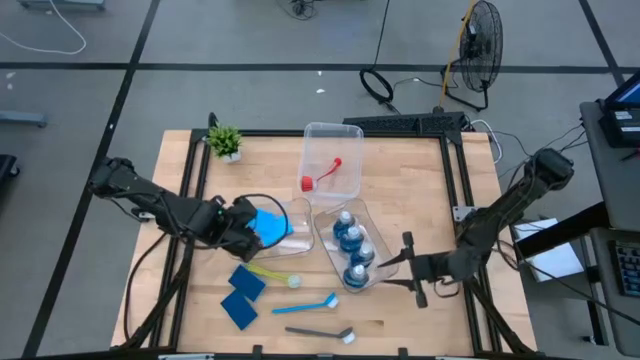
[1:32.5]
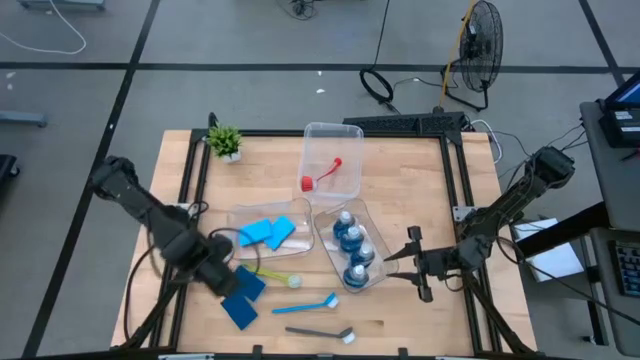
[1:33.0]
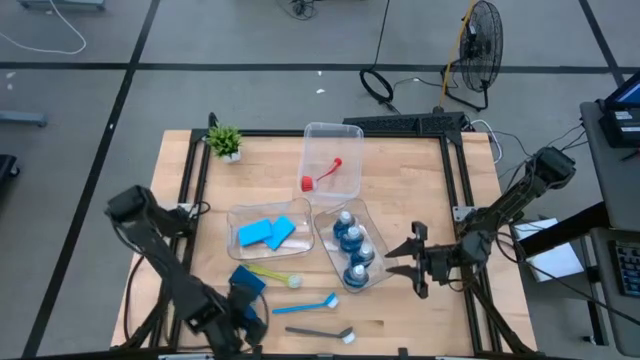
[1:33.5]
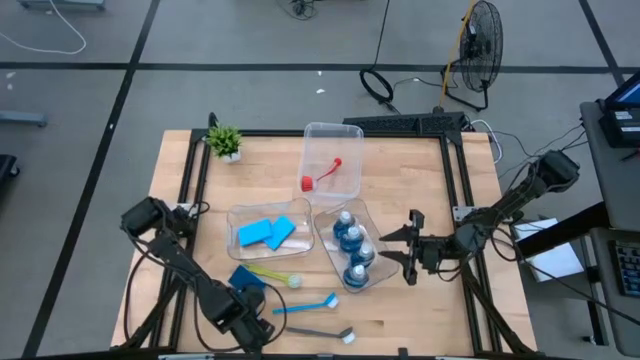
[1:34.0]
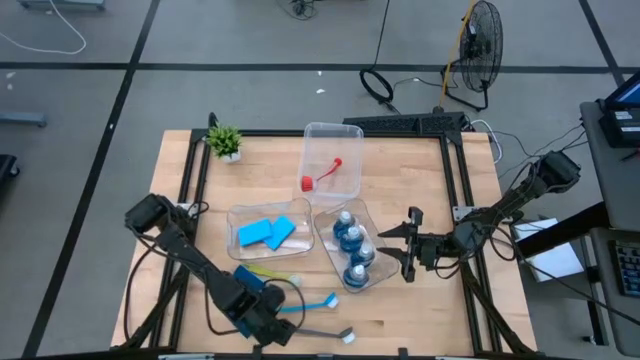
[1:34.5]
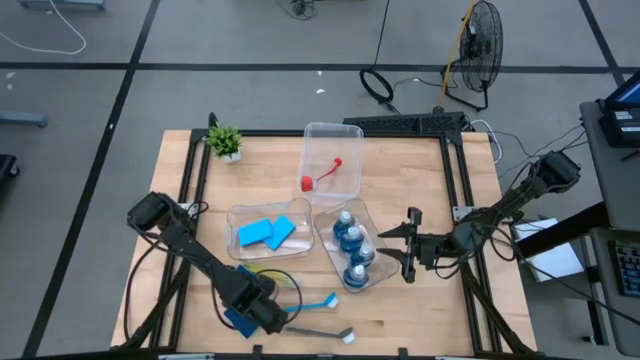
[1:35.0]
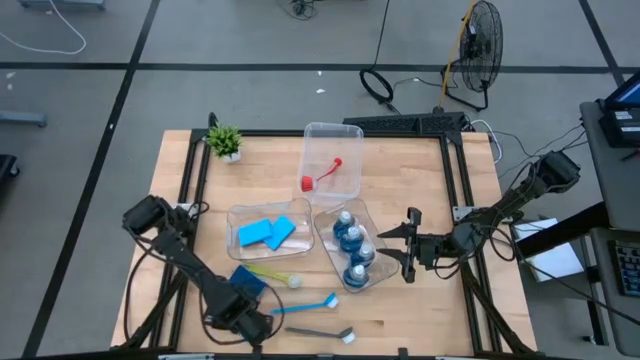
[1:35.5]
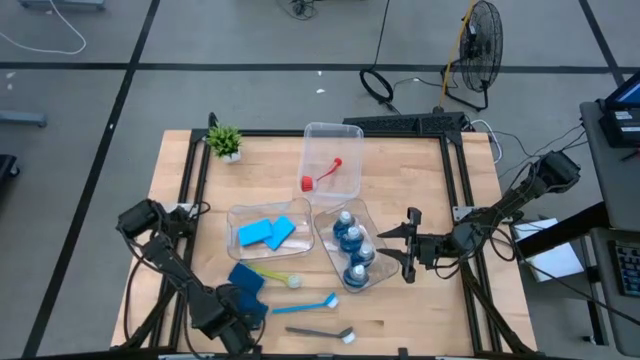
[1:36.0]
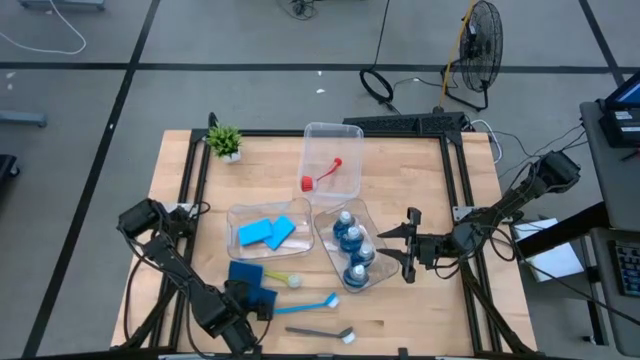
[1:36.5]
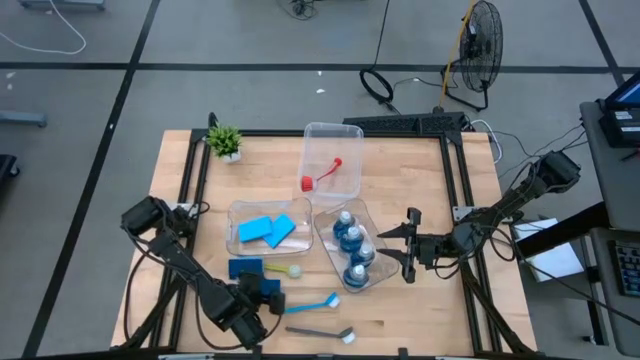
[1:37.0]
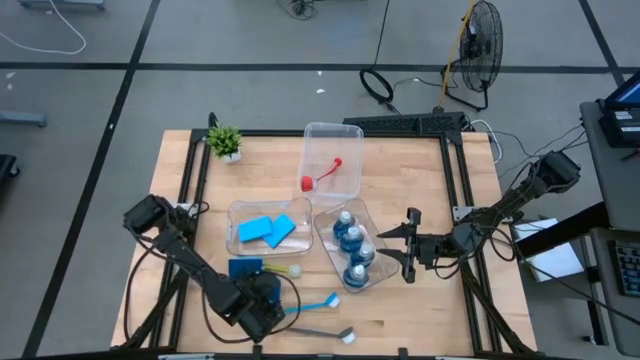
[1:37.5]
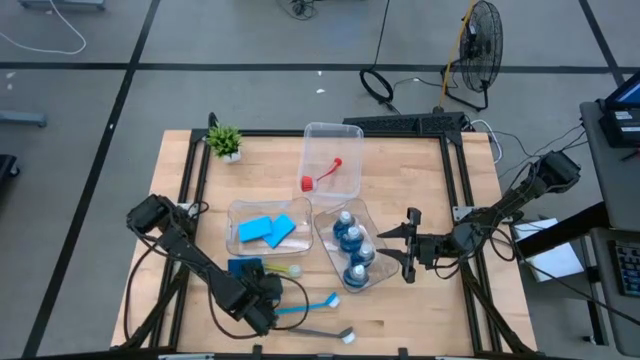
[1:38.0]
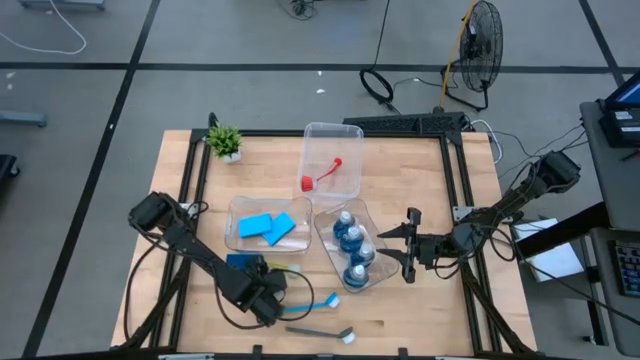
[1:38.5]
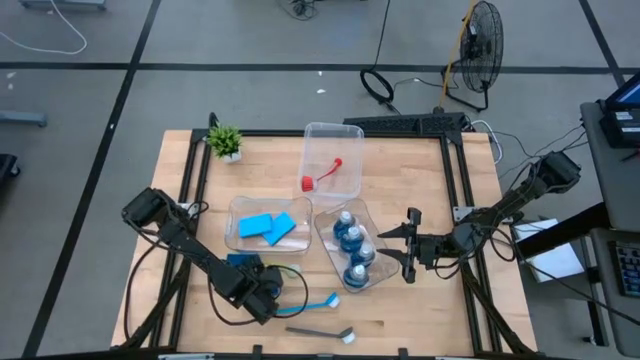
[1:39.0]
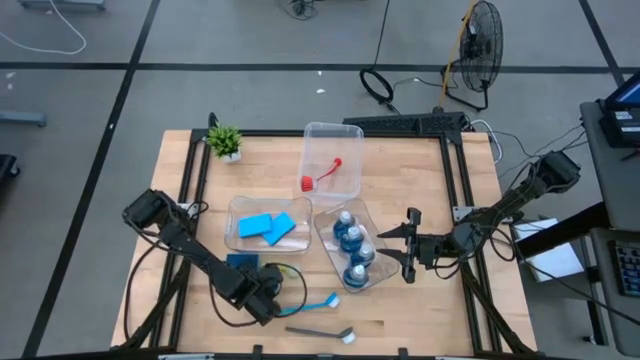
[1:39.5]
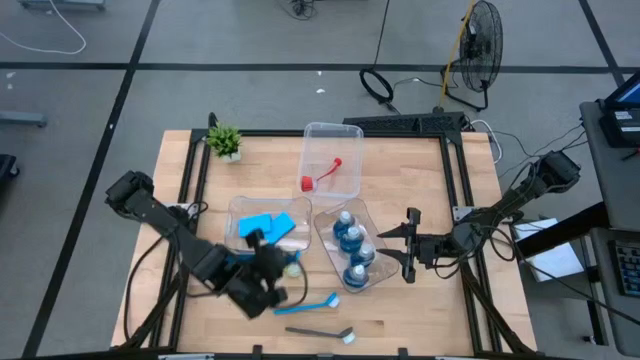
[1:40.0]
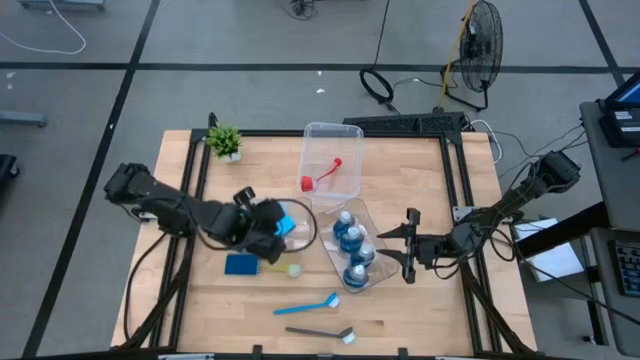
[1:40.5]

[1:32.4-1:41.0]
Task: Pick & Place Kitchen Sink Supplies
Put the blue sponge into the left transparent bin

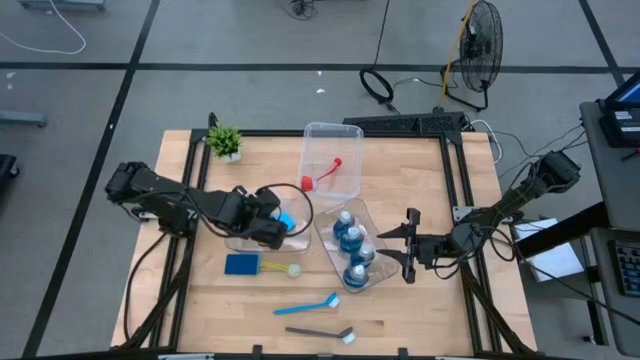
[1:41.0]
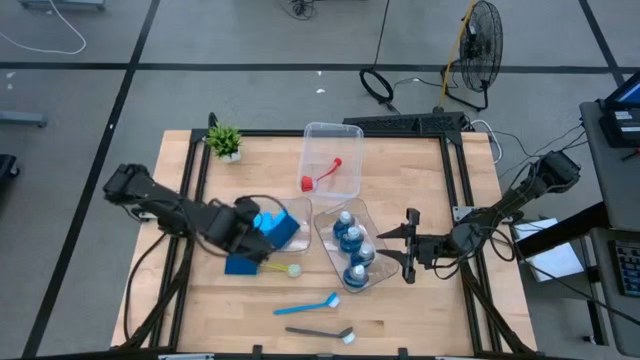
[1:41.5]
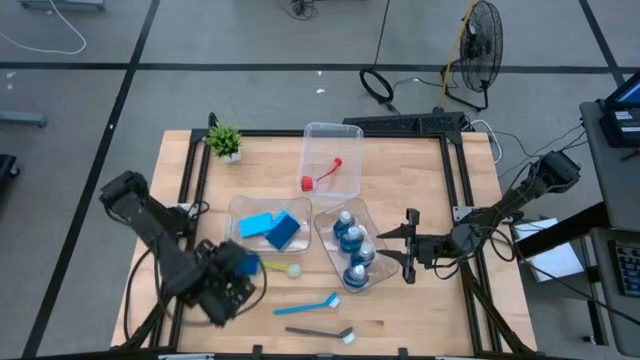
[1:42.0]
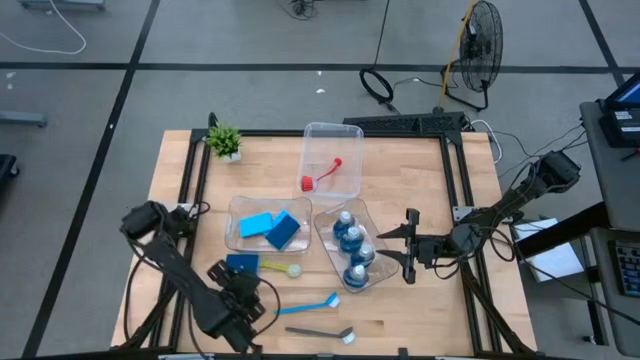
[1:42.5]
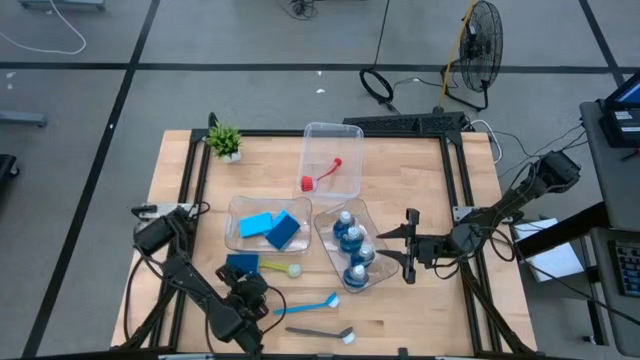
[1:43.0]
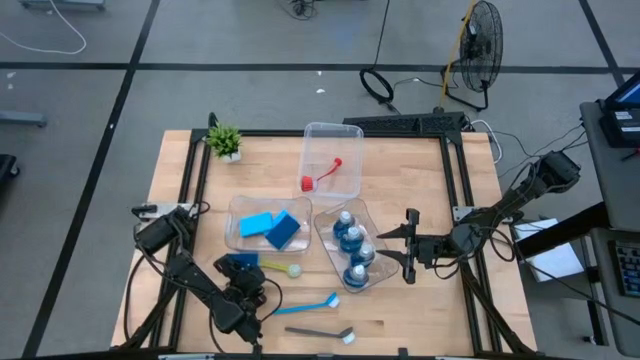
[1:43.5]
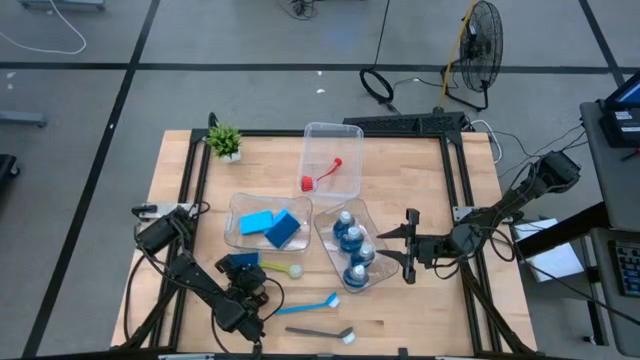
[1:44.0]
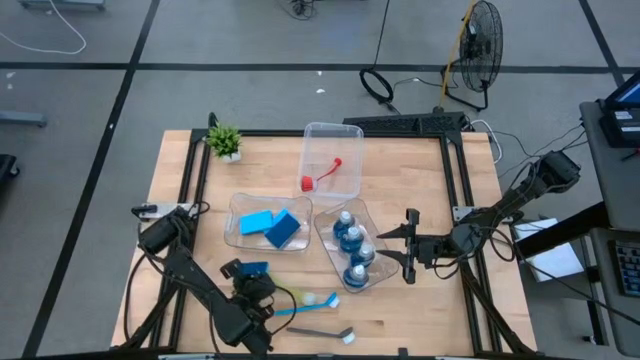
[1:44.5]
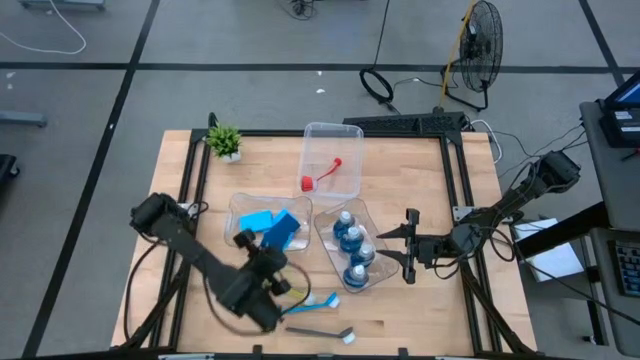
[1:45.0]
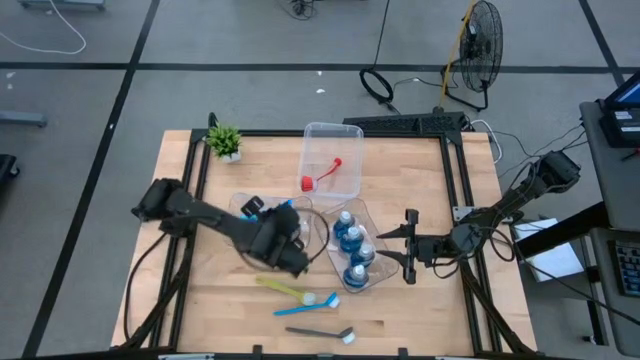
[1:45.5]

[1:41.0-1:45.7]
Put the blue sponge into the left transparent bin

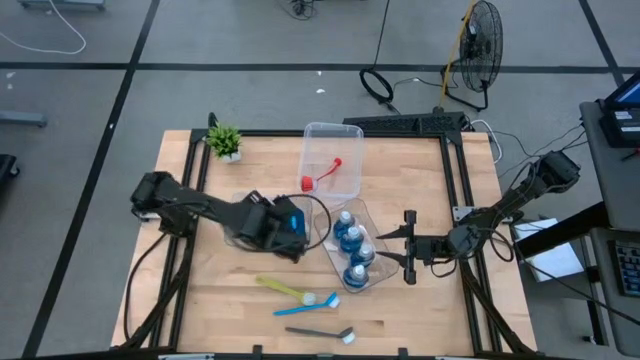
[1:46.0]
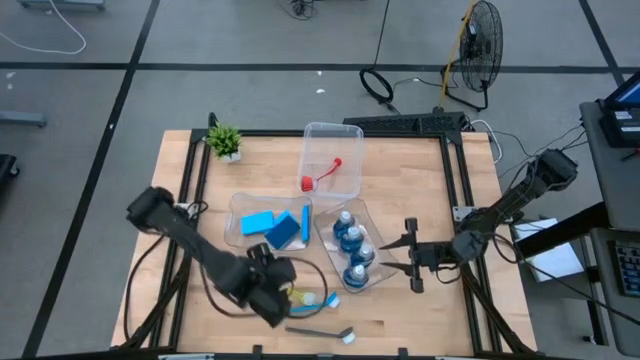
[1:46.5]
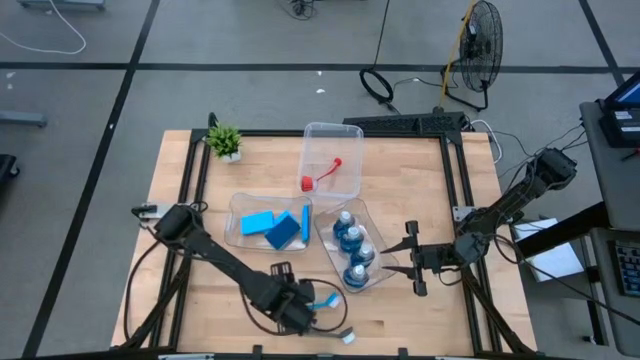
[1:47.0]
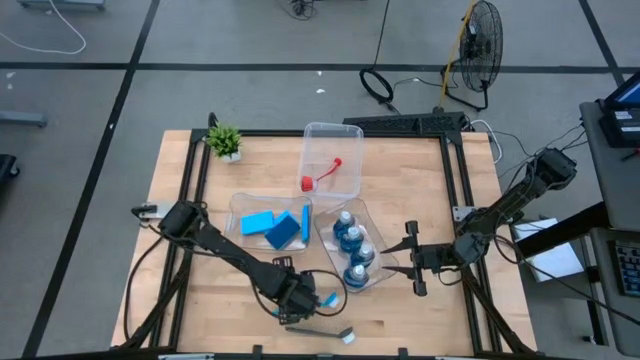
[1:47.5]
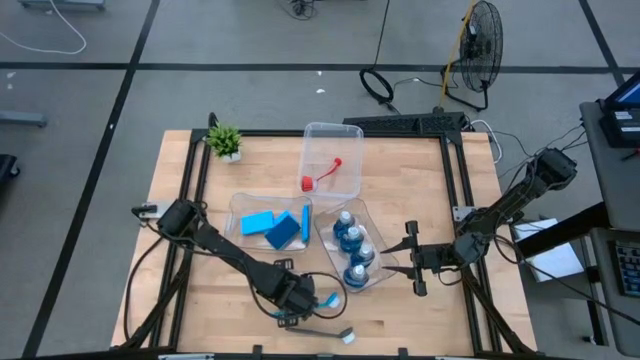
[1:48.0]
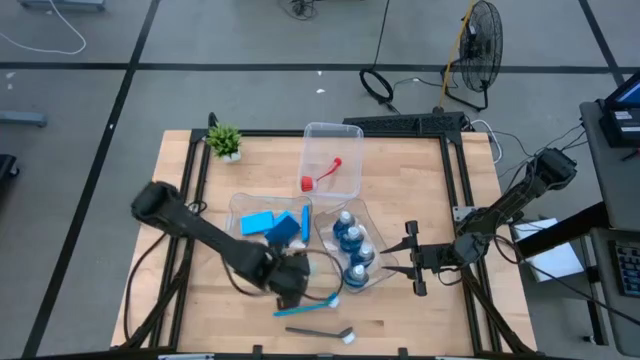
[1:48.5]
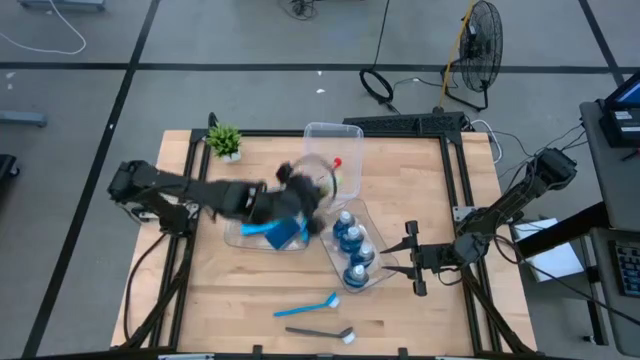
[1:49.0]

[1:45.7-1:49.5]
Put the green dish brush into the transparent container

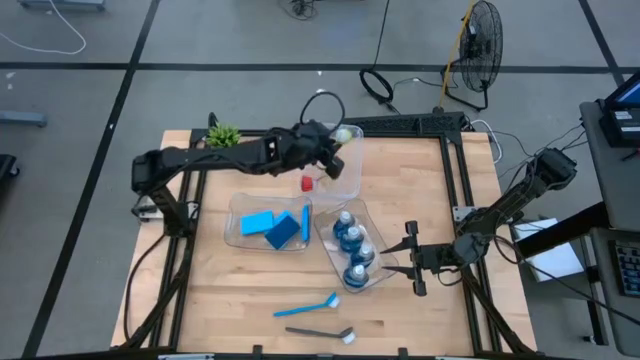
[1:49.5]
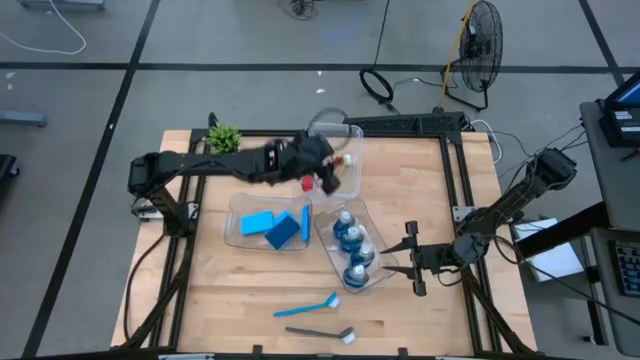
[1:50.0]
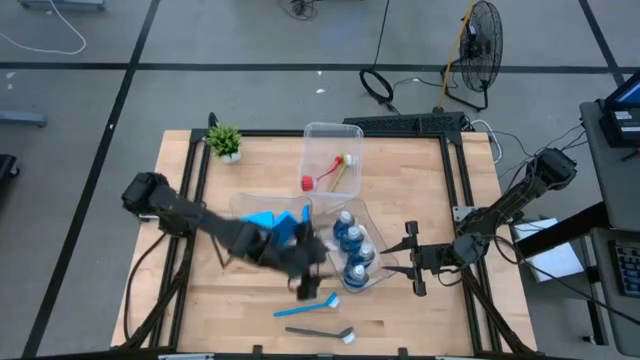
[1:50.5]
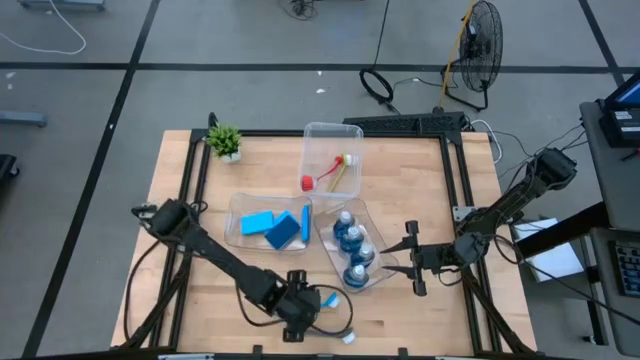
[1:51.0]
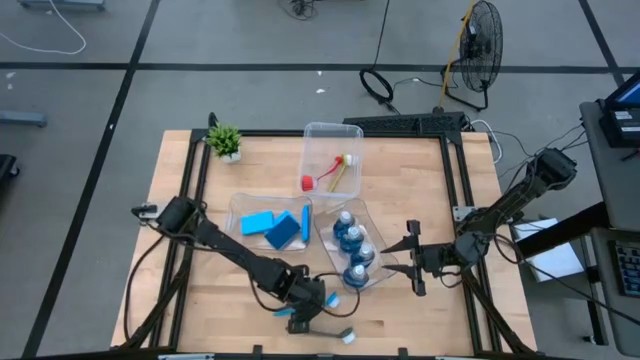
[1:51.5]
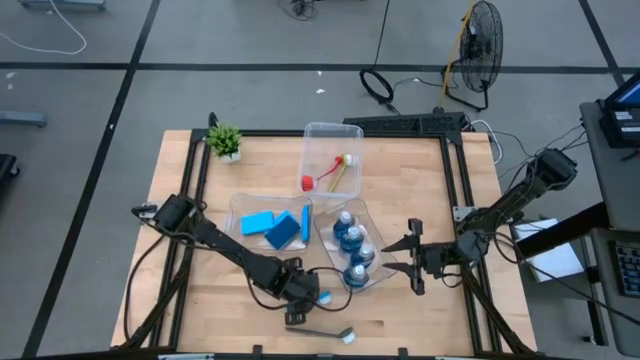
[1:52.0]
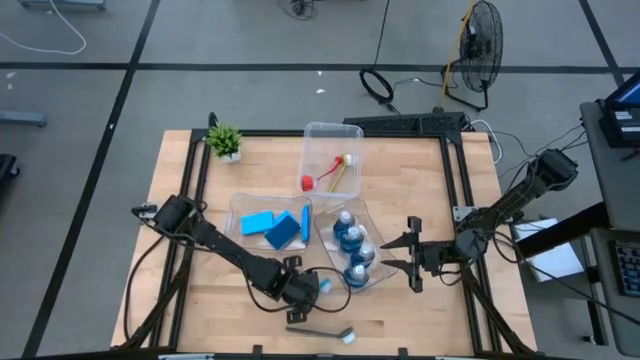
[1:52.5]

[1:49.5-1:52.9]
Put the blue dish brush into the transparent container

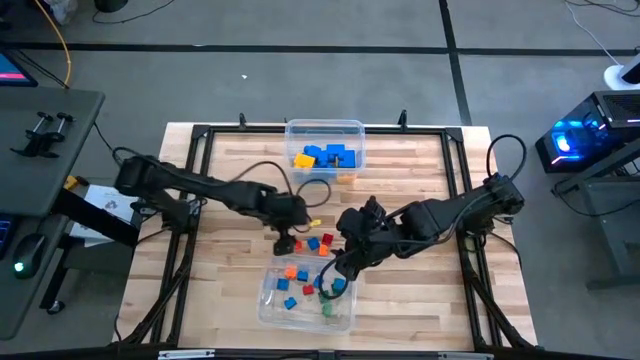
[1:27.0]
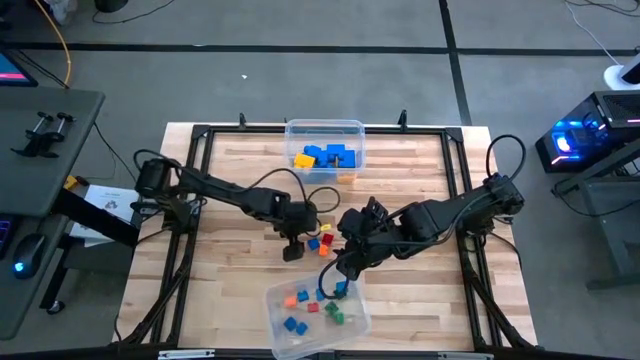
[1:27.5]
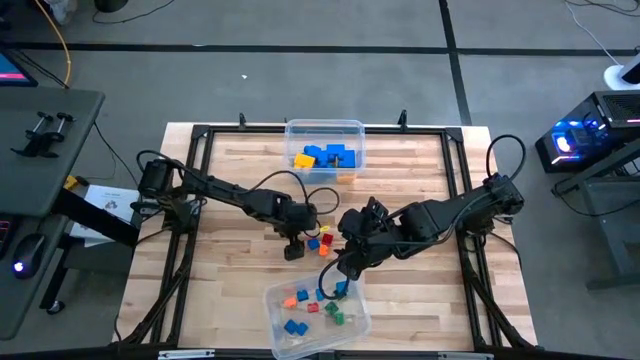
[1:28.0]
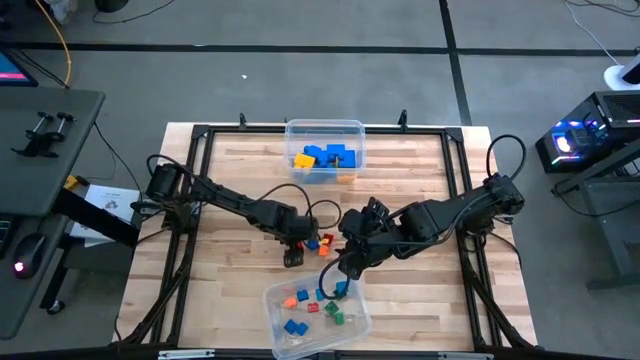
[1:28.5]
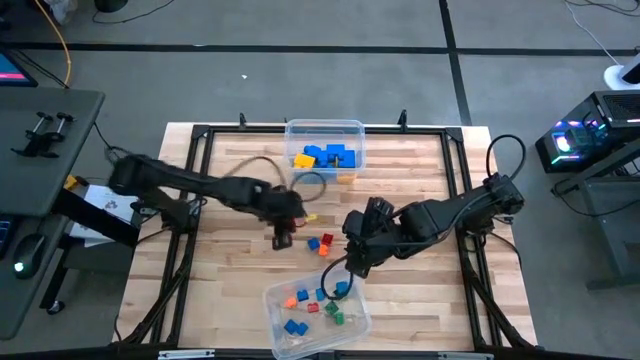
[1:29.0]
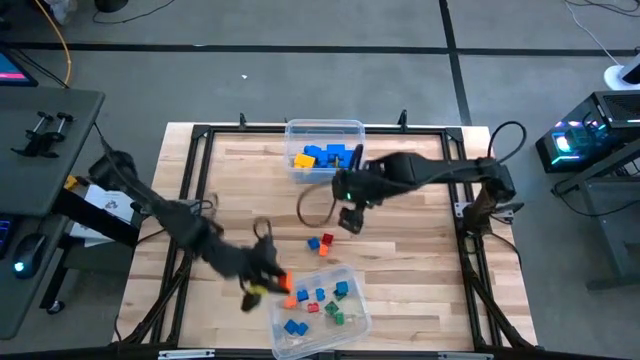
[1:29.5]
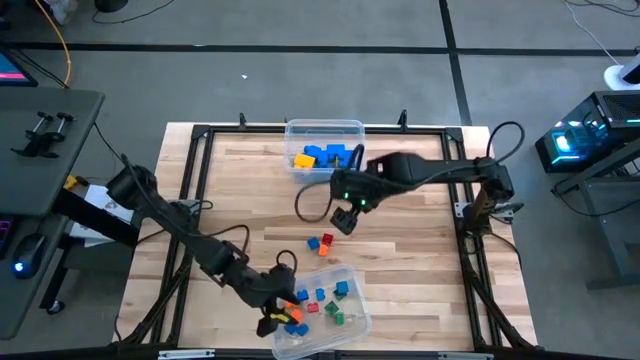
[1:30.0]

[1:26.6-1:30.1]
Task: Sort blocks by size
Put the small orange game piece into the bottom transparent bin
